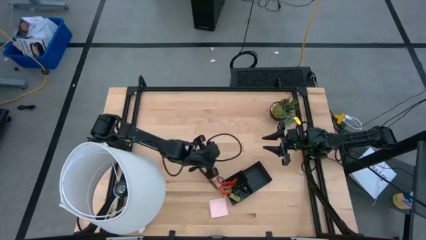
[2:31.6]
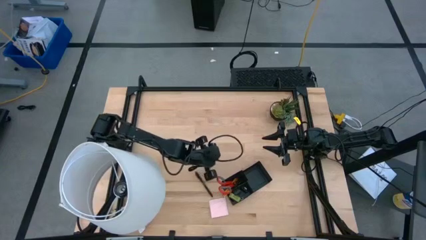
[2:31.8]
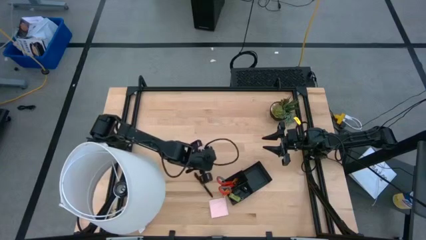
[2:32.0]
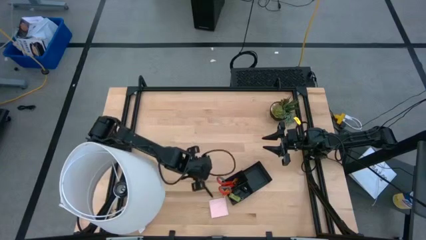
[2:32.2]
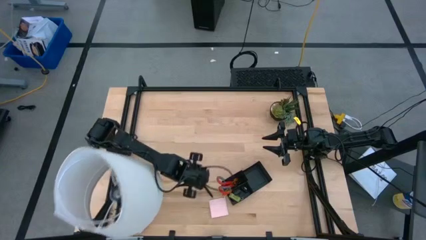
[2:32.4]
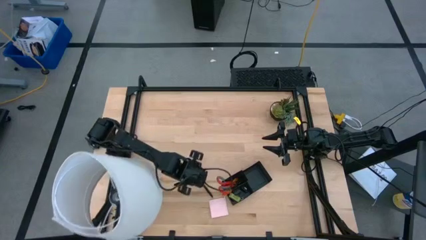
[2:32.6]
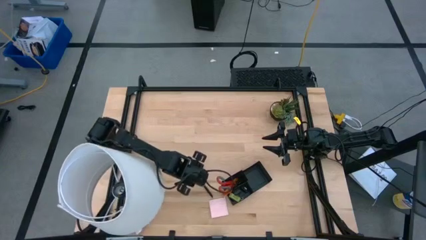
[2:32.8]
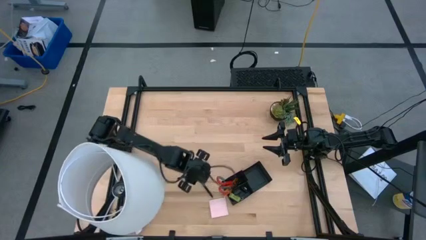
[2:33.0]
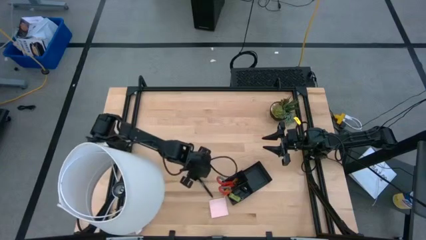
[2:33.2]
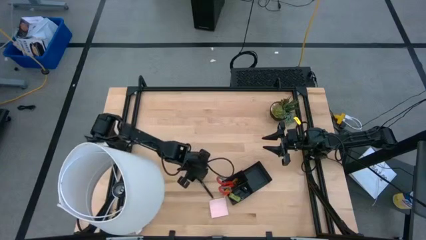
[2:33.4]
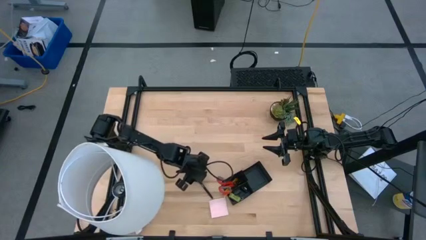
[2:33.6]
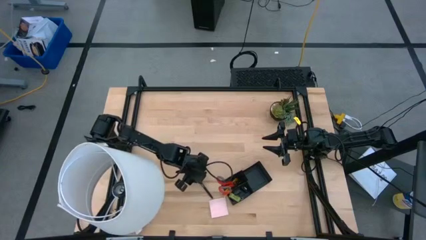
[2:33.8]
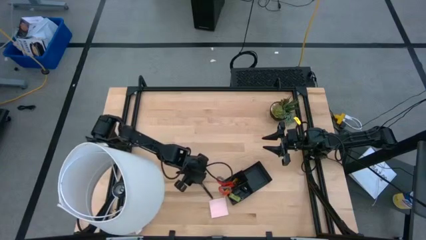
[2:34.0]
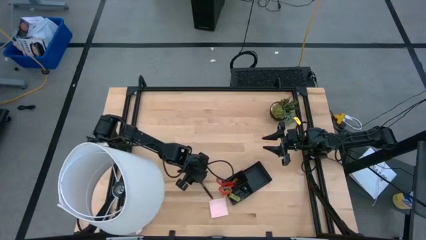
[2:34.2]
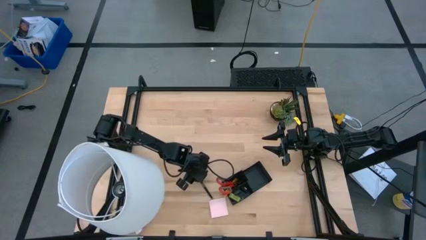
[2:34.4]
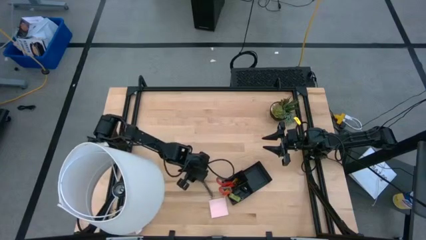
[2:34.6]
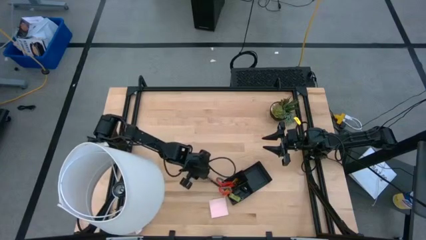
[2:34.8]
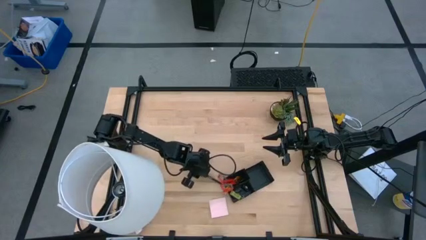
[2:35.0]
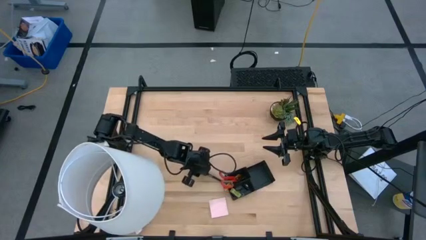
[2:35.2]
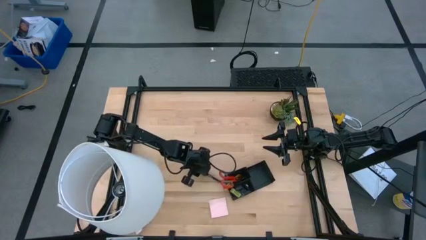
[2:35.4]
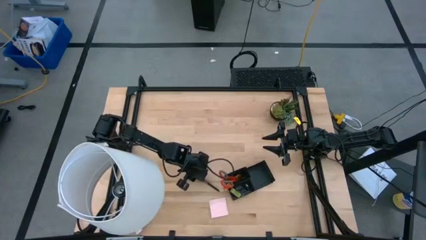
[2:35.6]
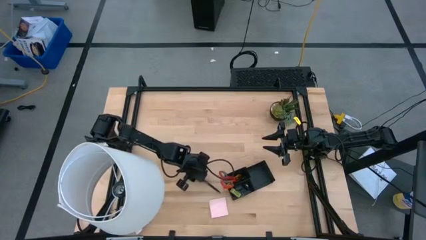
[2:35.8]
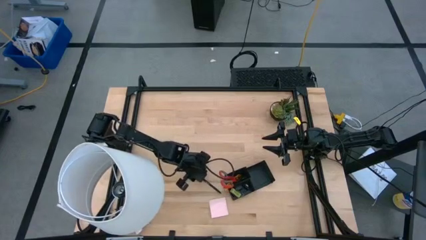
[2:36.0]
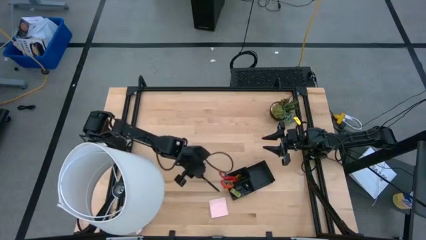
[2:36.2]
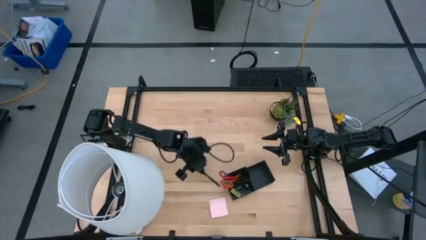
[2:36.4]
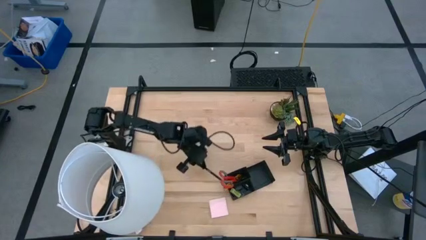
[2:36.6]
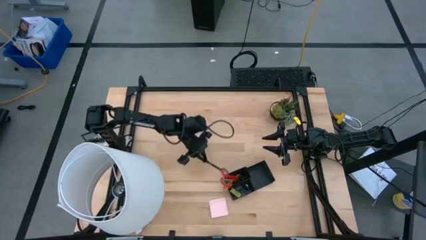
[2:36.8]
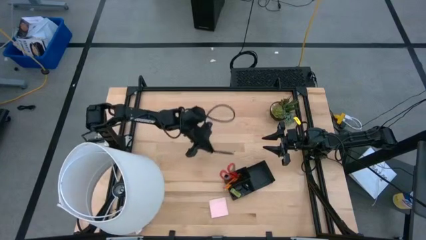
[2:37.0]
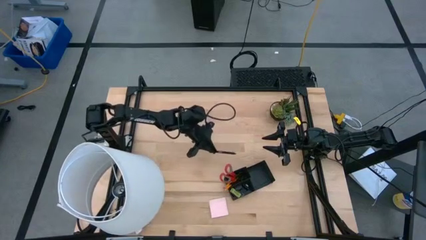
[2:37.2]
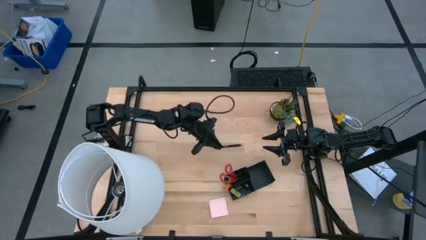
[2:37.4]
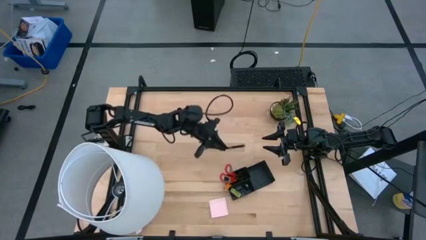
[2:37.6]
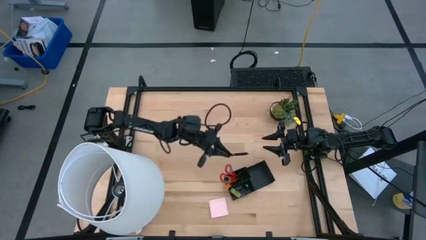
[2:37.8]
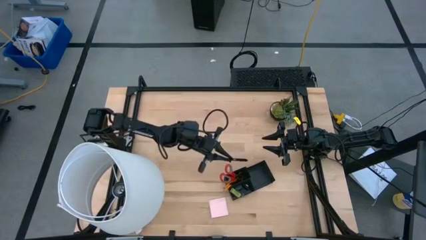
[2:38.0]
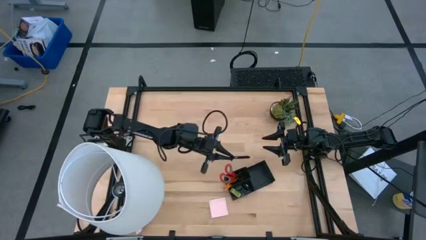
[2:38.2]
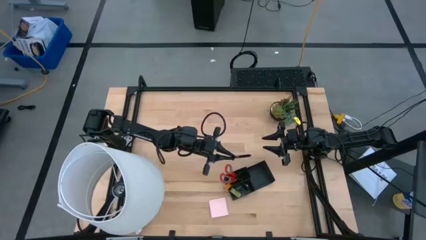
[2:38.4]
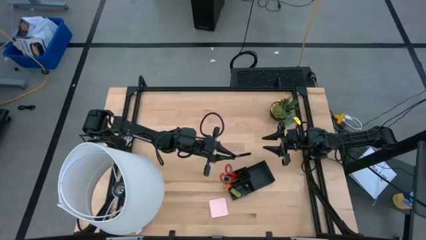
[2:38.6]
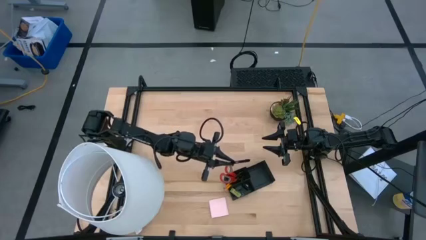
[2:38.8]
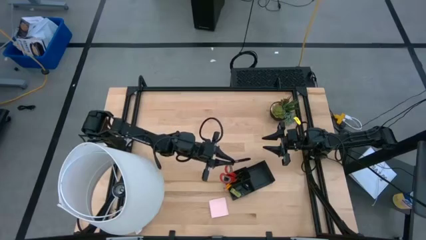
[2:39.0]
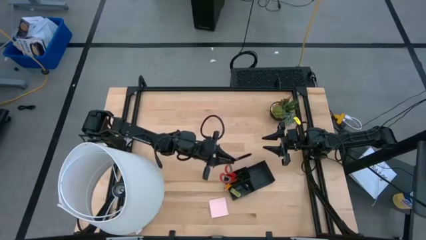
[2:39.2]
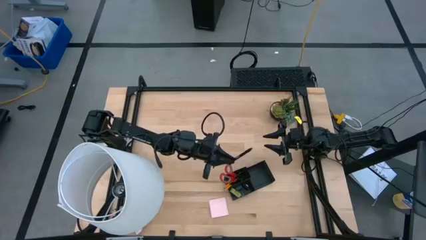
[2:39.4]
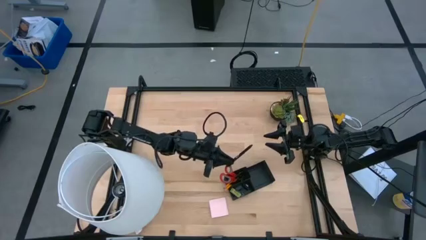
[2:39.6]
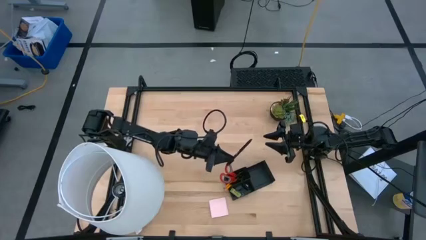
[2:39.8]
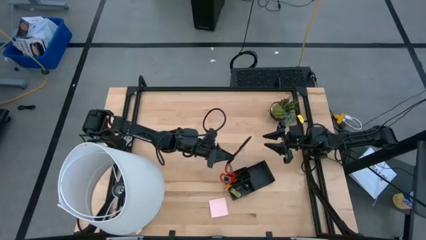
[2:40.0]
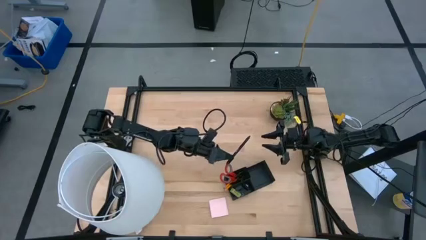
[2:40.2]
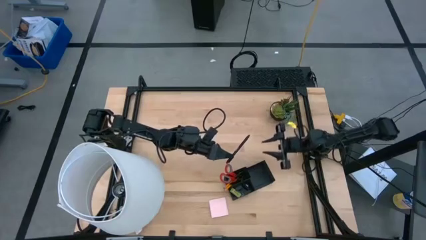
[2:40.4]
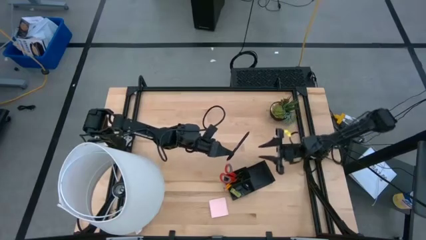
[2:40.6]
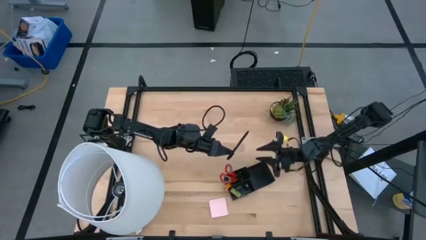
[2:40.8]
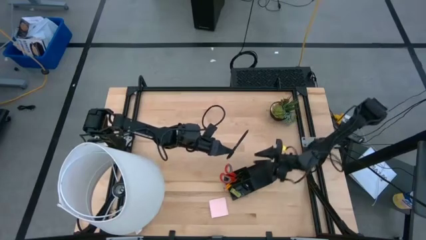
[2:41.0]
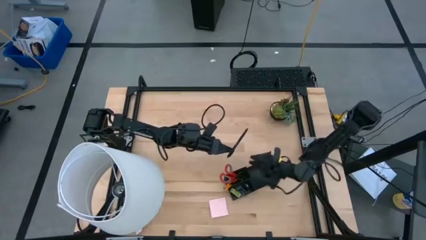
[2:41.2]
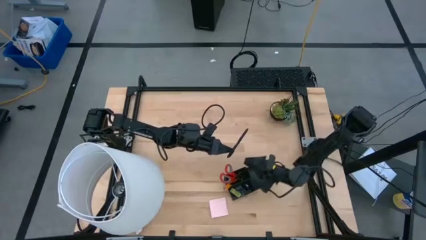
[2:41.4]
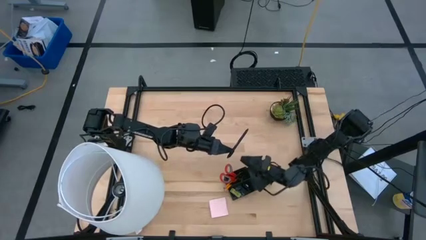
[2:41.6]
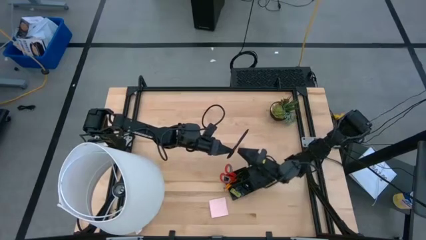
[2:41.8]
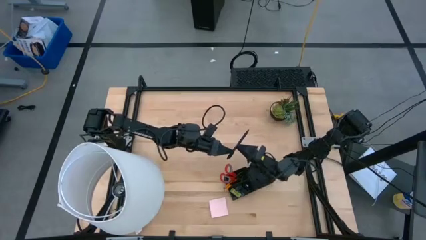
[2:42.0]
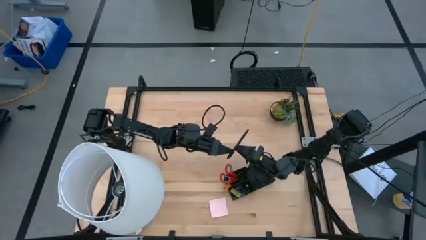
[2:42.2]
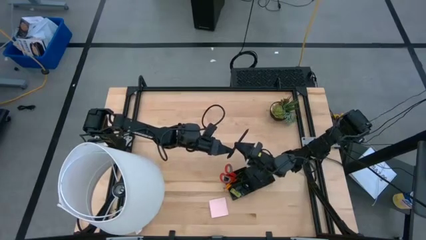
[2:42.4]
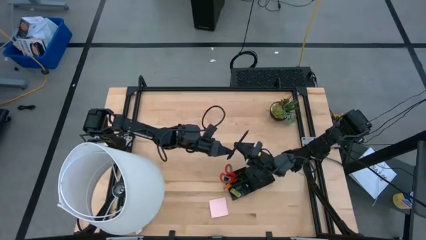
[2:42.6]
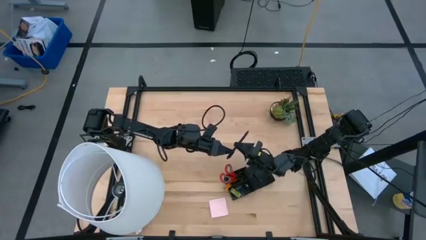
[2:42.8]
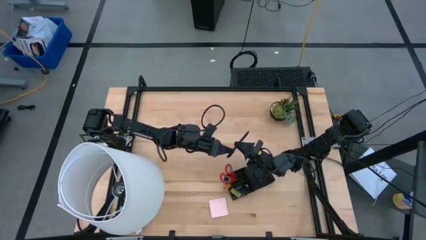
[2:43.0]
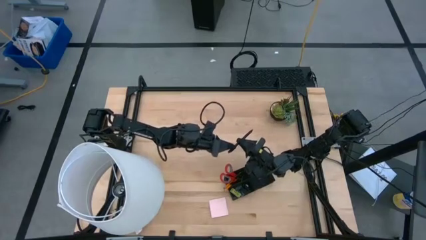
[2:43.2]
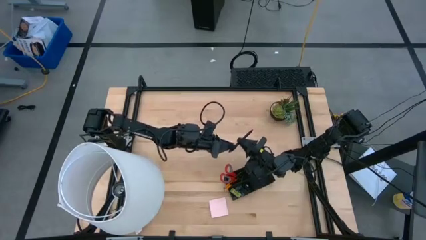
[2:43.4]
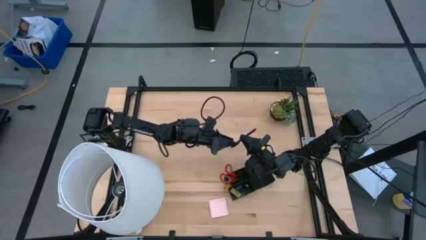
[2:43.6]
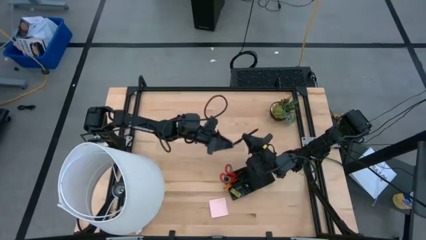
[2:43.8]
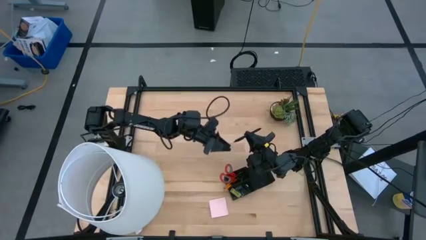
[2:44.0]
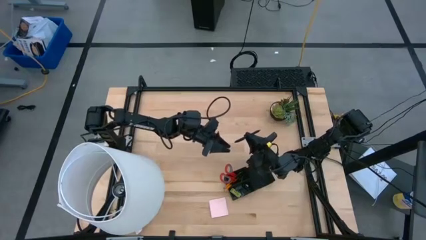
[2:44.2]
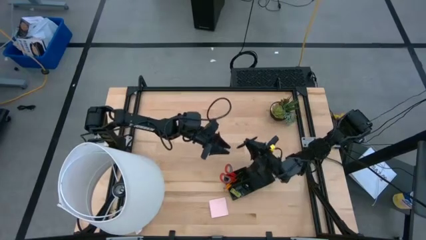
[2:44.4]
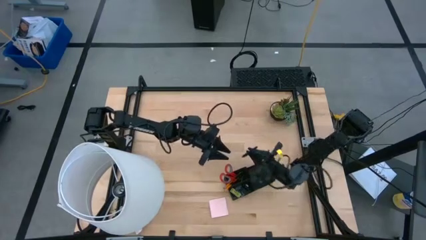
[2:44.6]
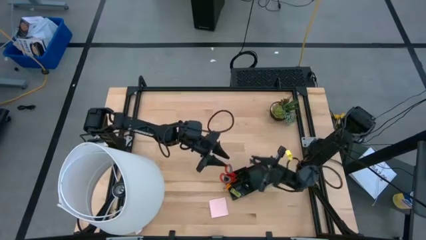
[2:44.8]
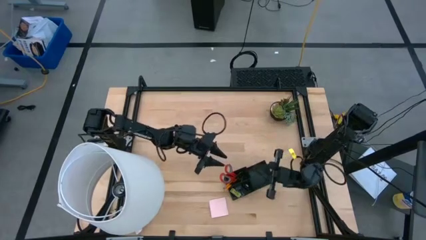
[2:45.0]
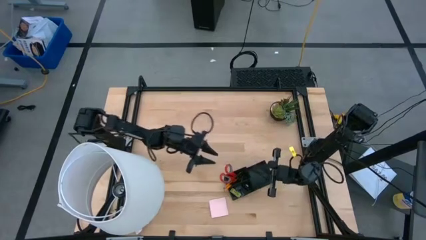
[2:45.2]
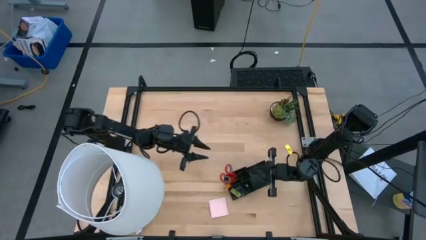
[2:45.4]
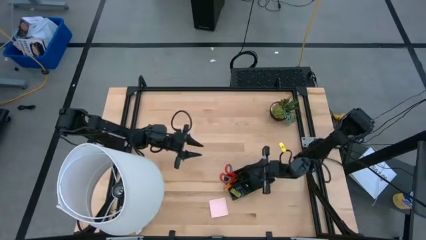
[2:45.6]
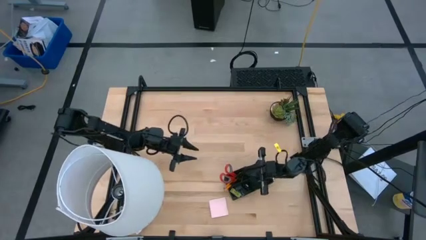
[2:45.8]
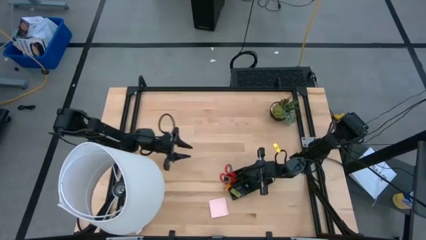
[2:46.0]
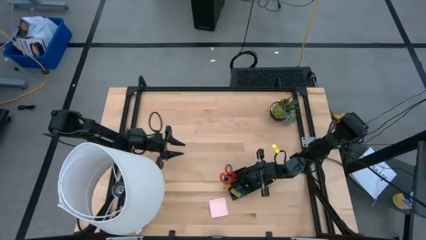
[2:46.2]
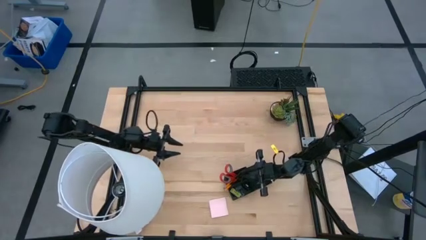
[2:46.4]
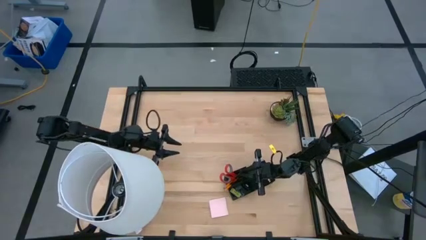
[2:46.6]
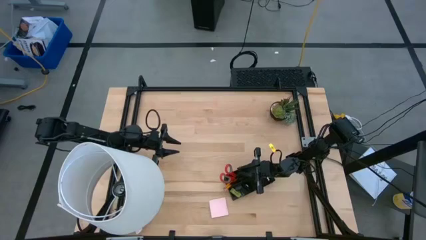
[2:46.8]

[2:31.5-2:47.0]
Task: Pick and place office supplies into organizer
Put the black pen into the black desk organizer
